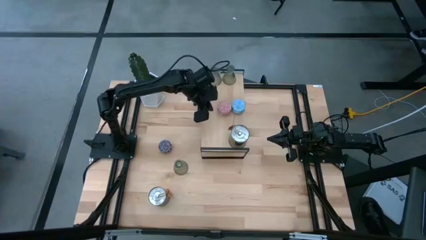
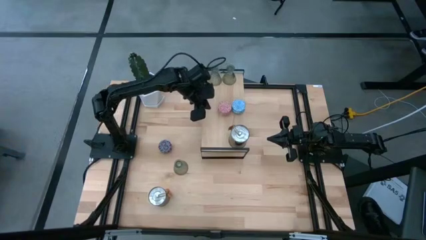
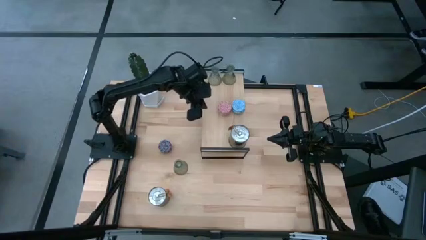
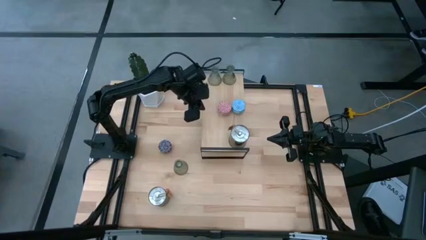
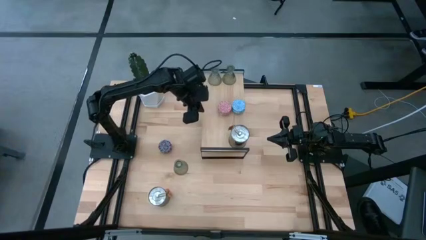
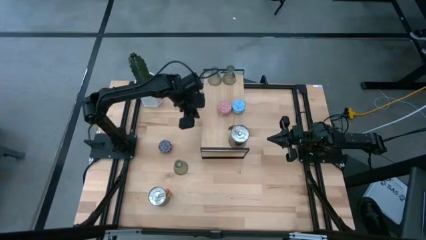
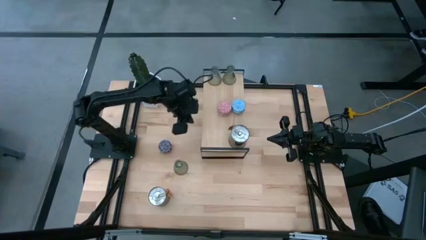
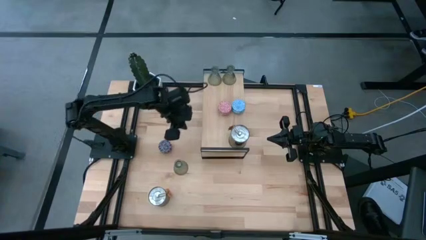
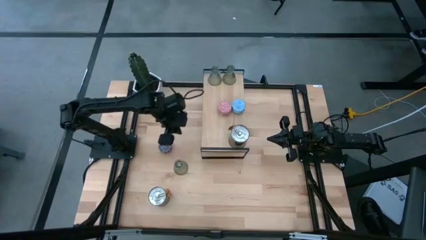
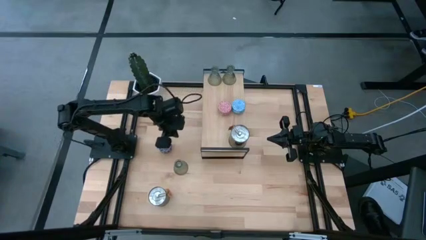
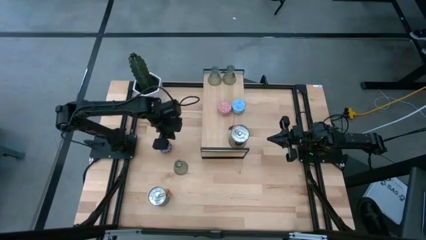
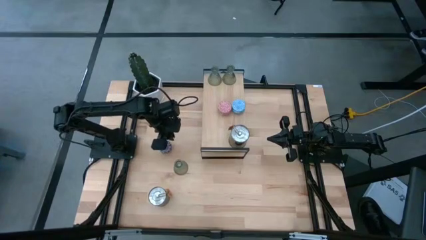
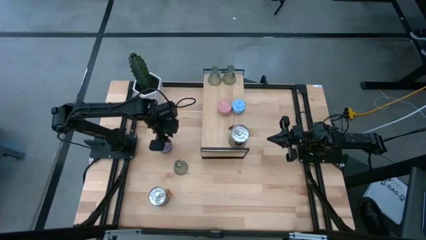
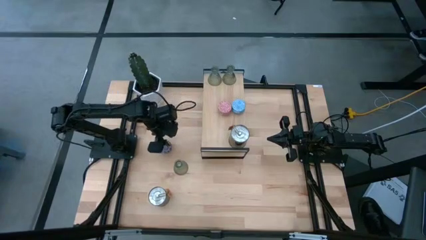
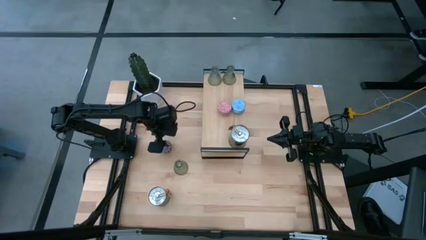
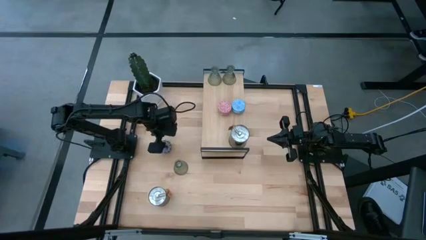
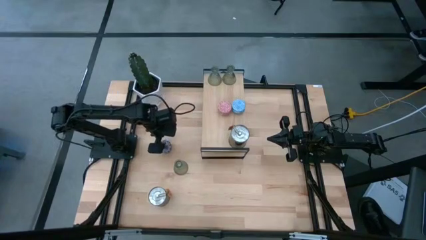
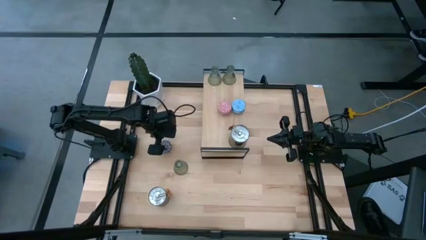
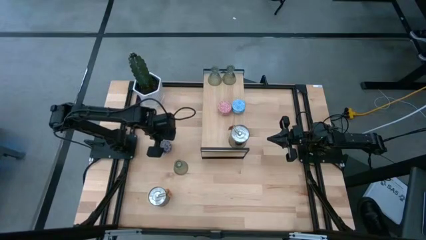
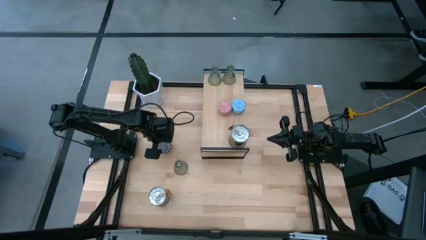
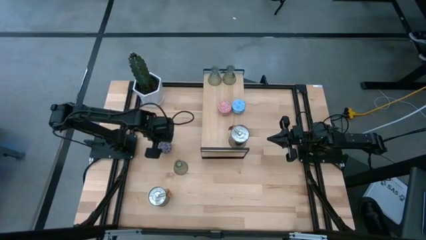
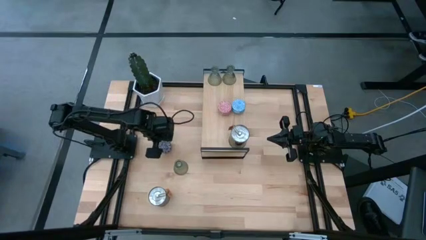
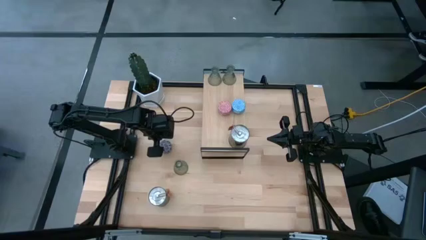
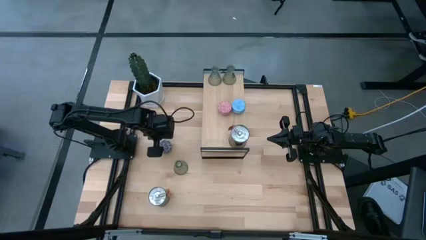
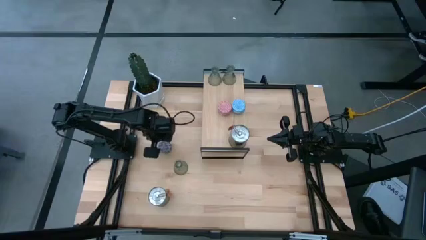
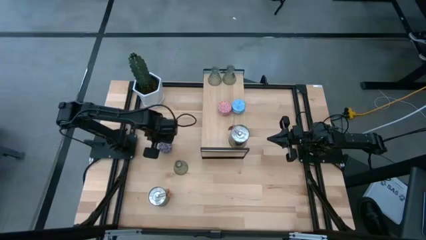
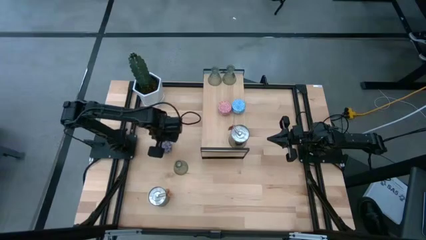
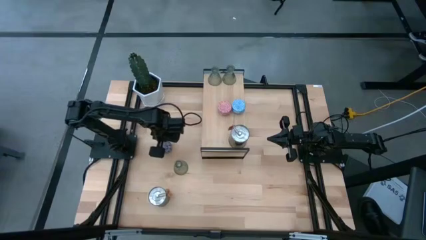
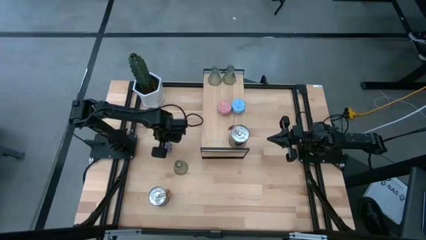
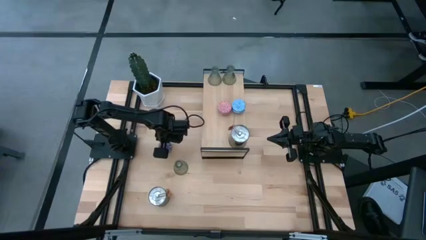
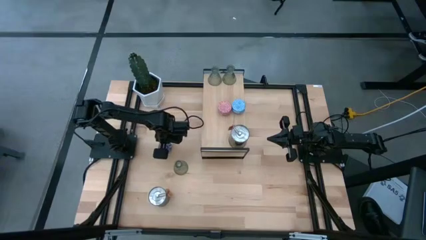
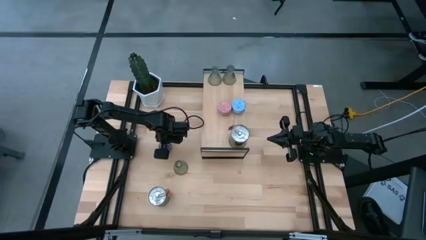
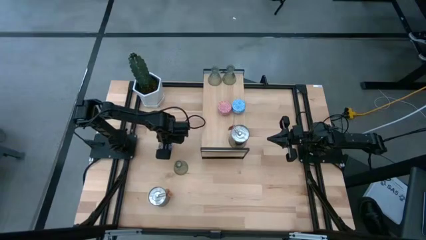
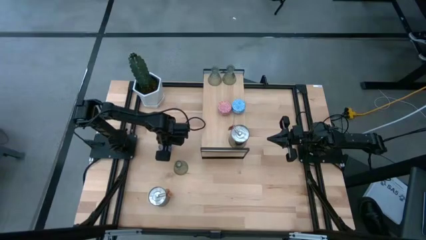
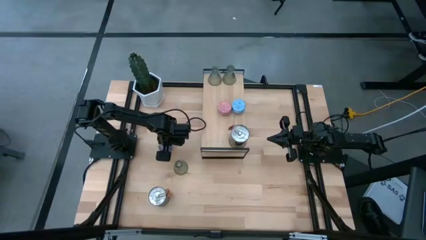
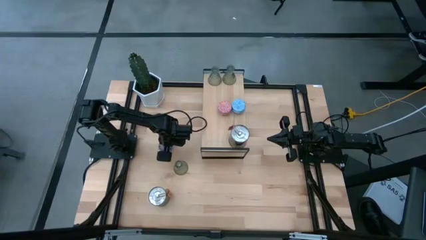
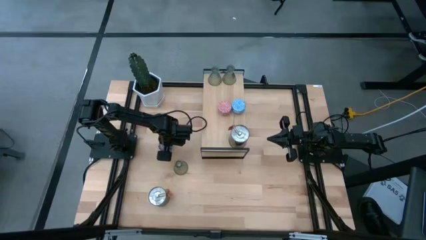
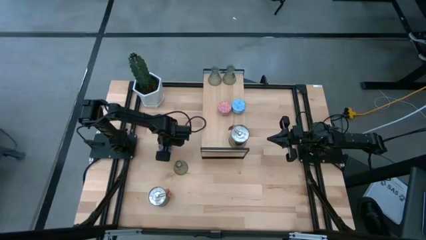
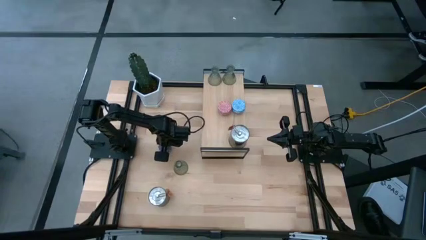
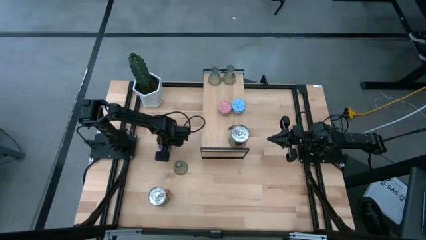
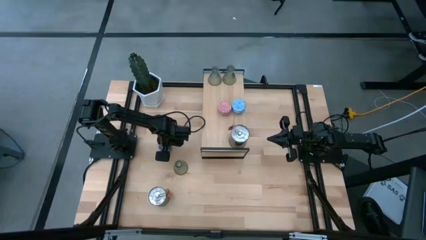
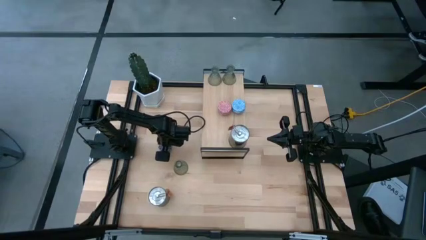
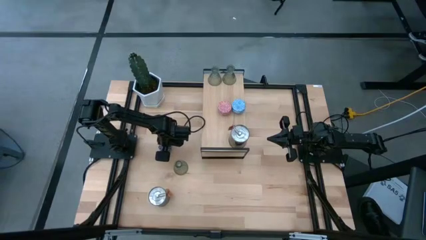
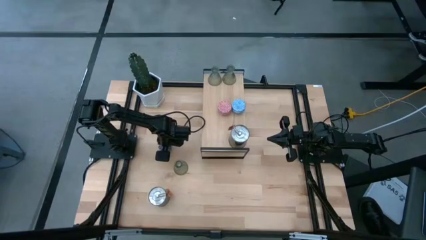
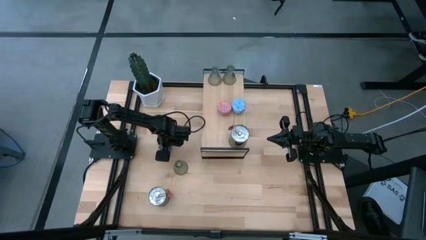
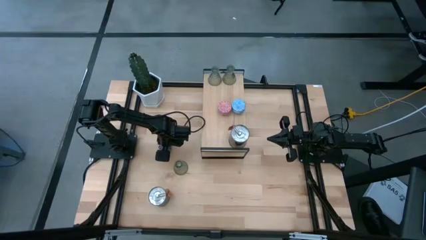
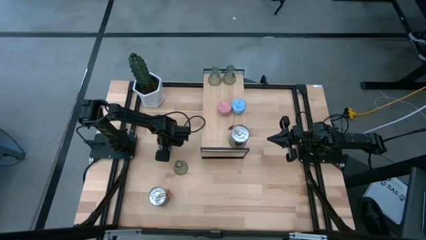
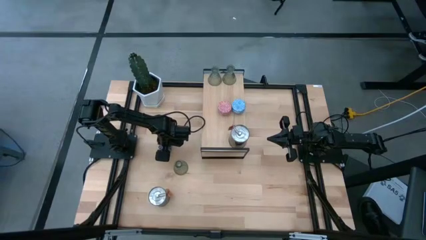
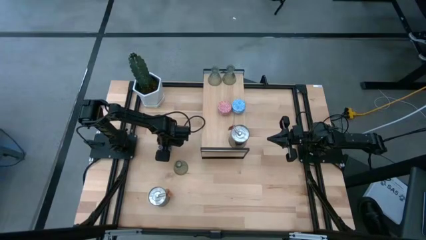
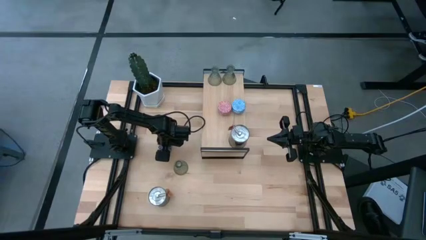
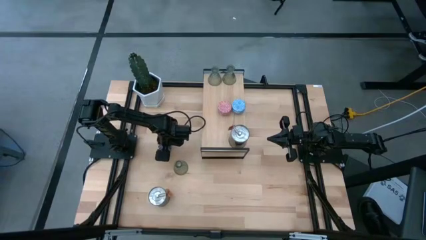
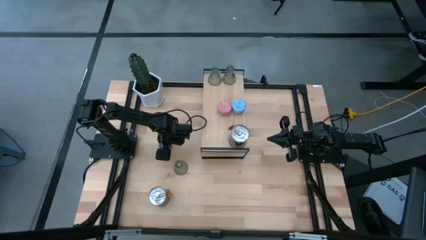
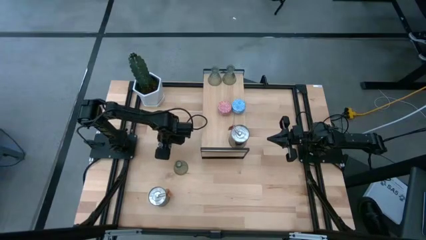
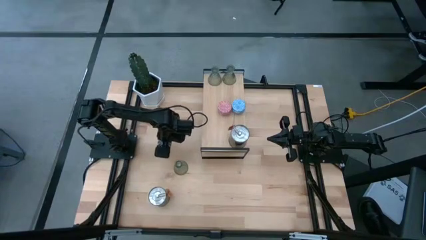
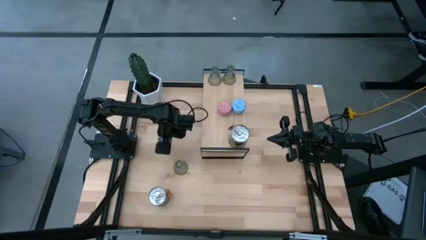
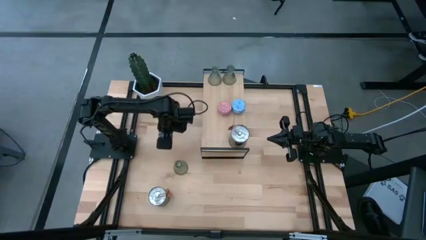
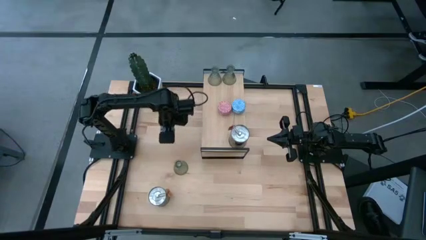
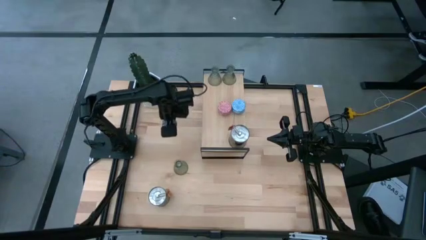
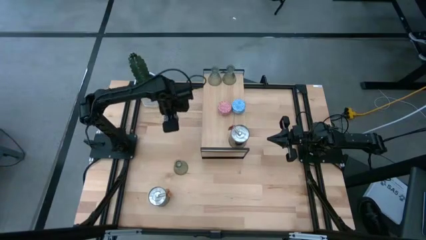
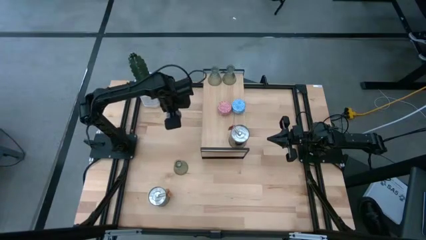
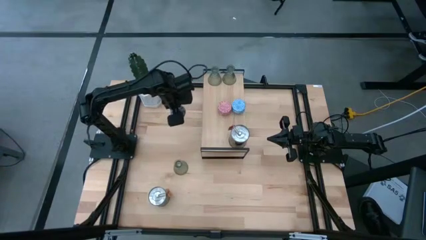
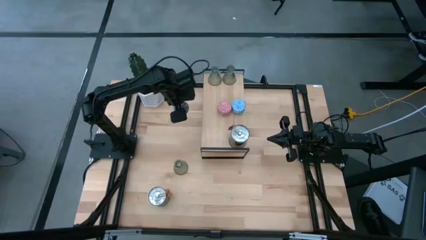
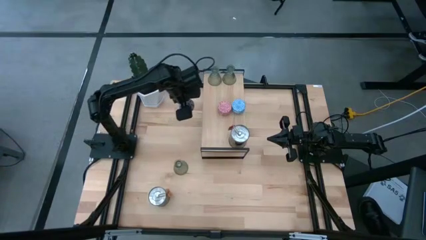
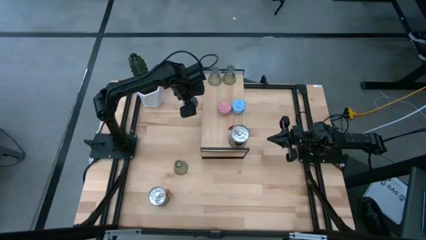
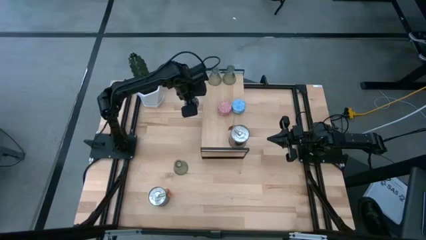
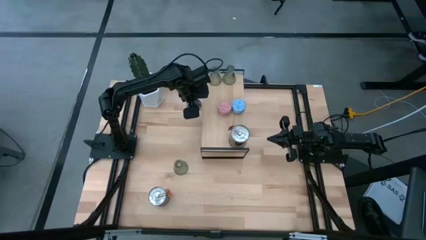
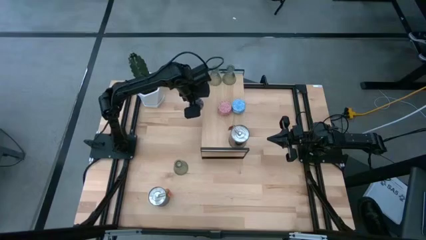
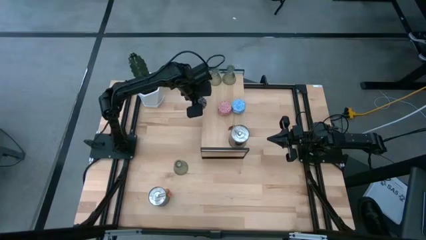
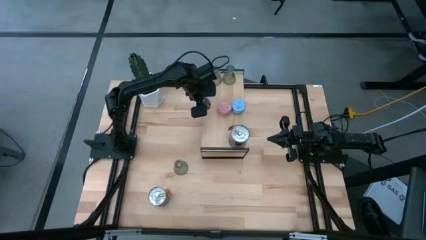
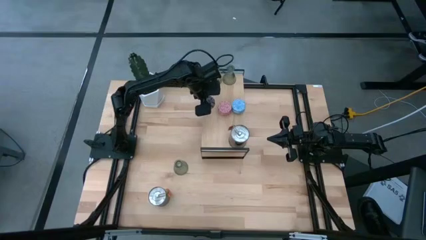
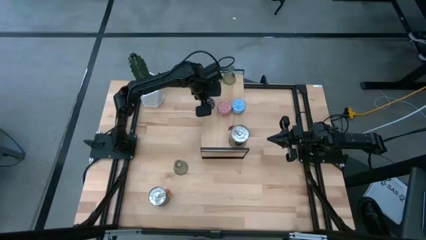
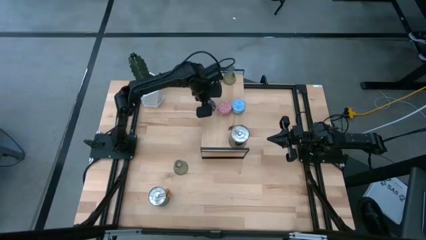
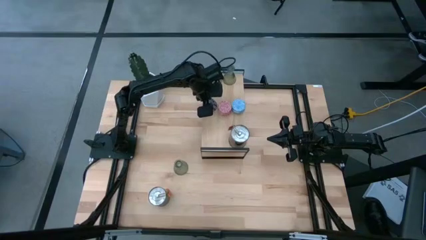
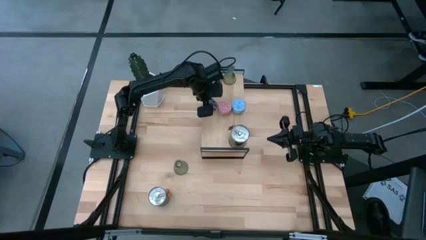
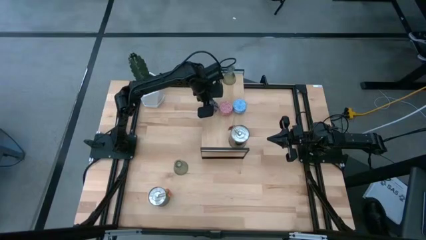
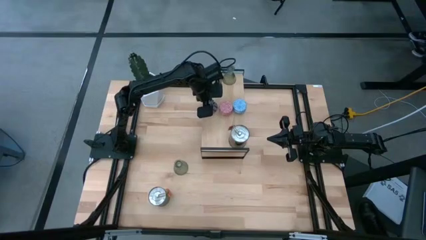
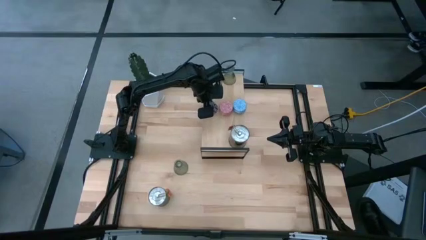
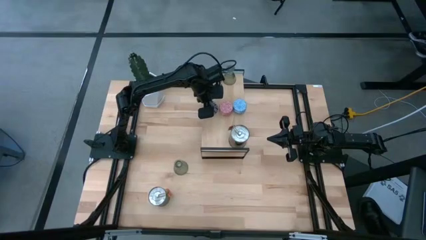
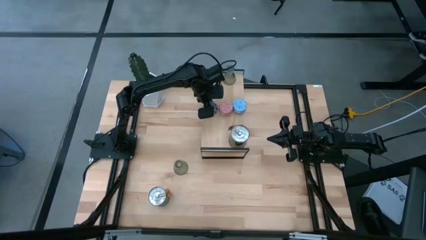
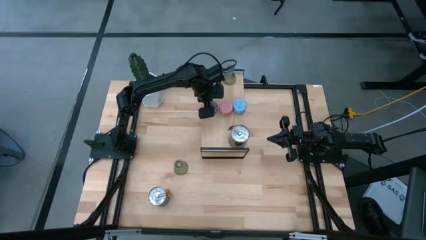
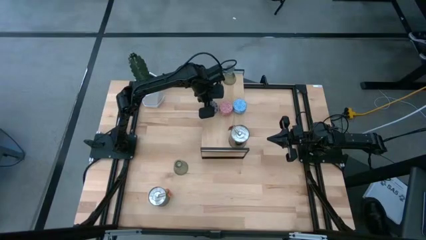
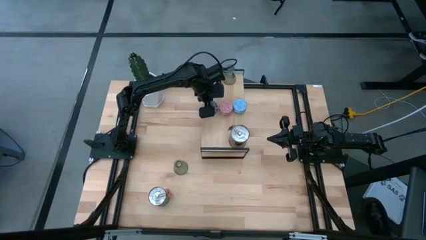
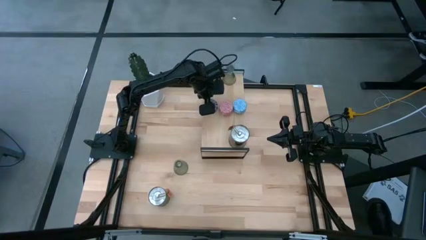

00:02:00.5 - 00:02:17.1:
Task: Pick & Place candle stick holders
Put the black scented candle on the shelf
